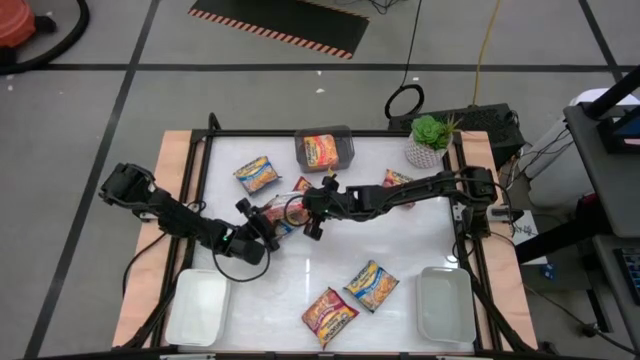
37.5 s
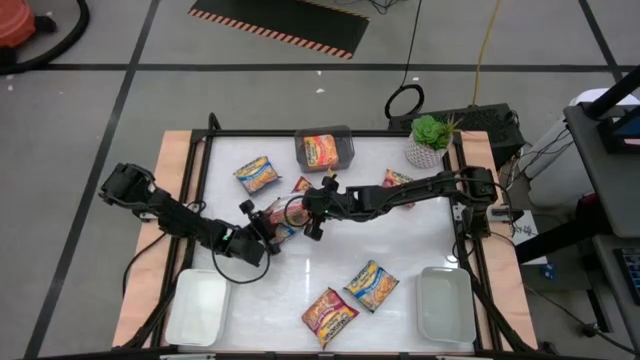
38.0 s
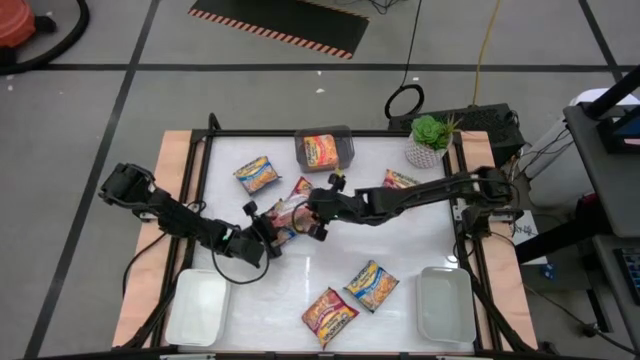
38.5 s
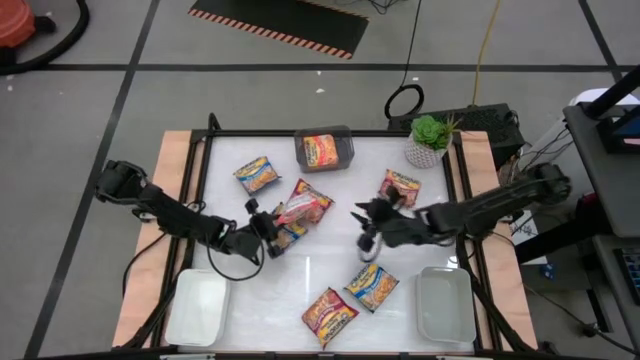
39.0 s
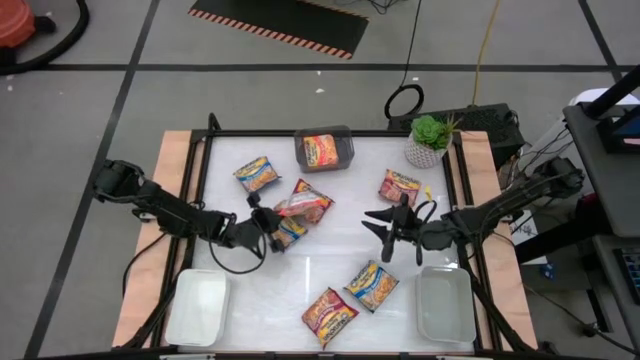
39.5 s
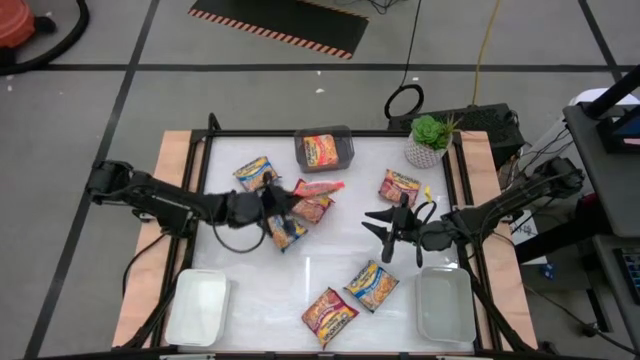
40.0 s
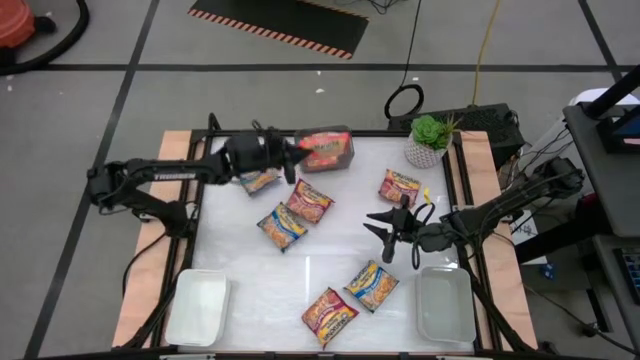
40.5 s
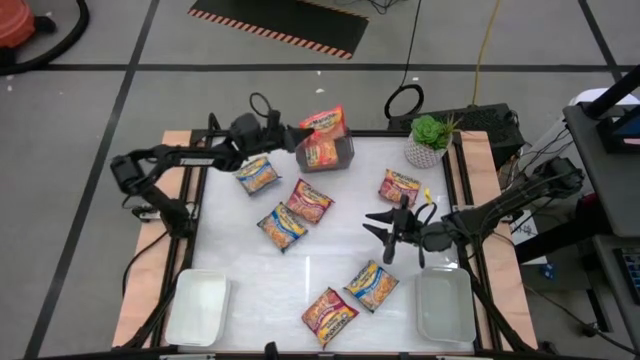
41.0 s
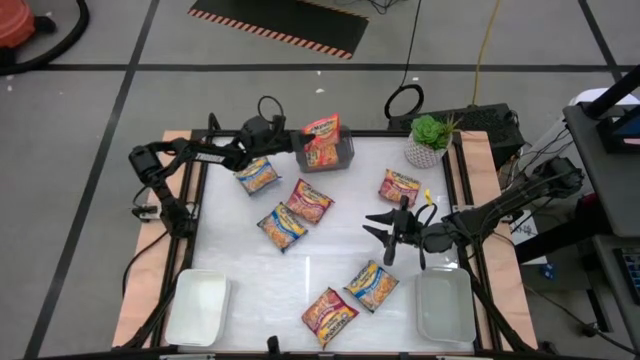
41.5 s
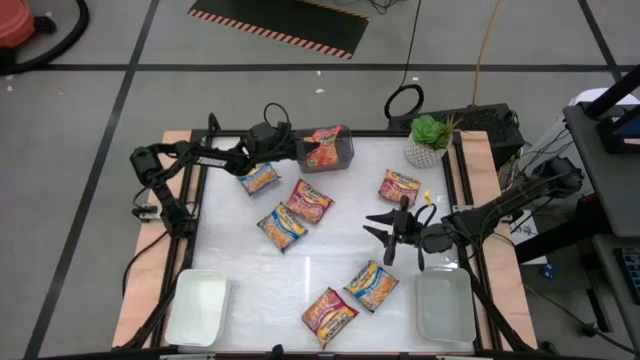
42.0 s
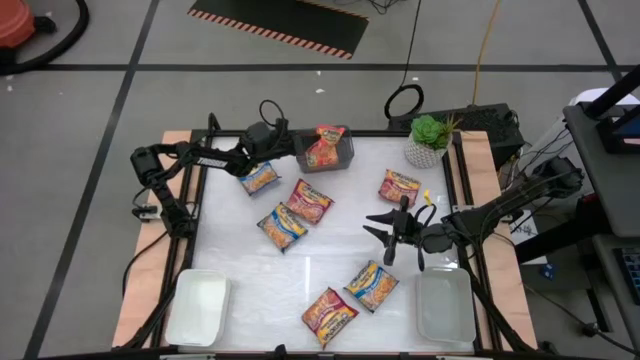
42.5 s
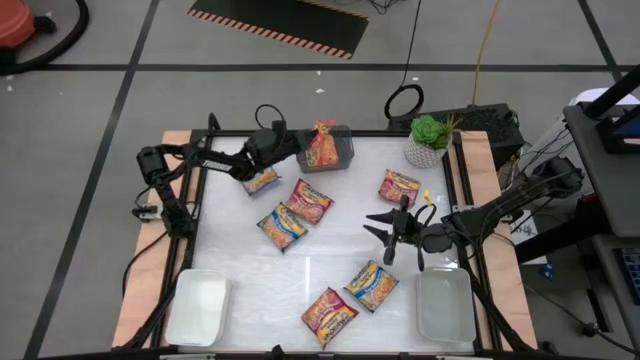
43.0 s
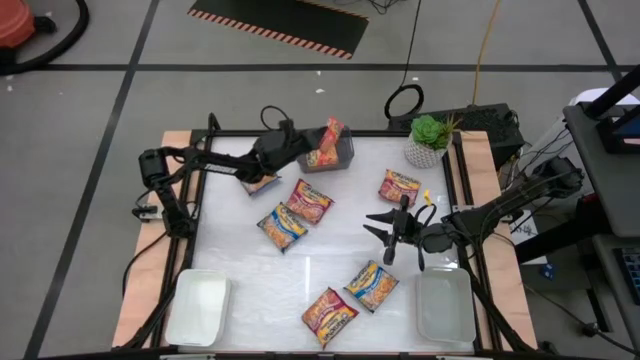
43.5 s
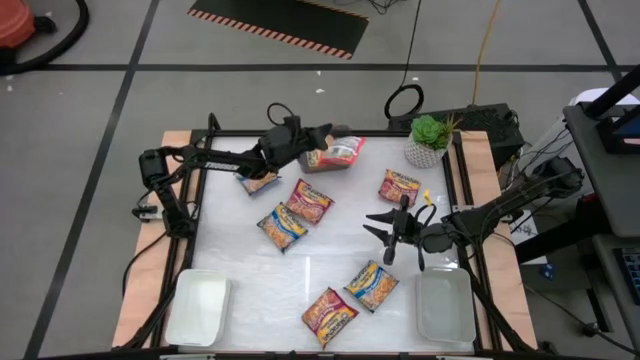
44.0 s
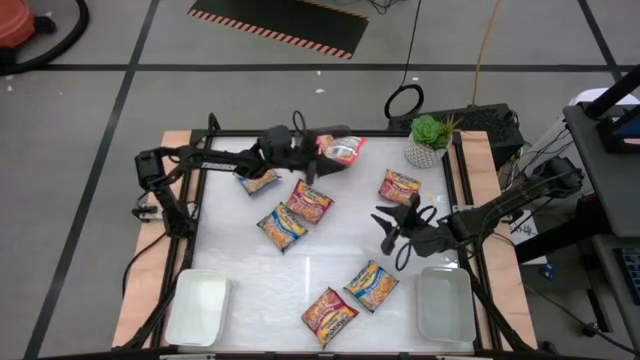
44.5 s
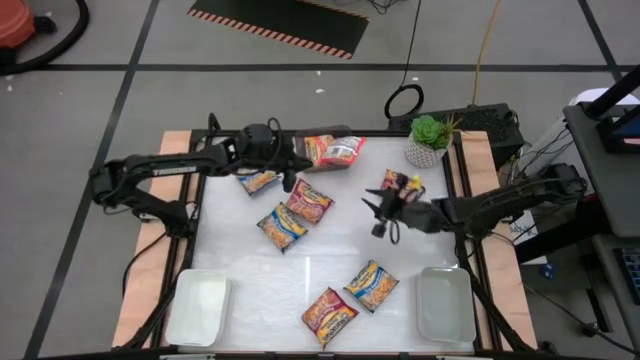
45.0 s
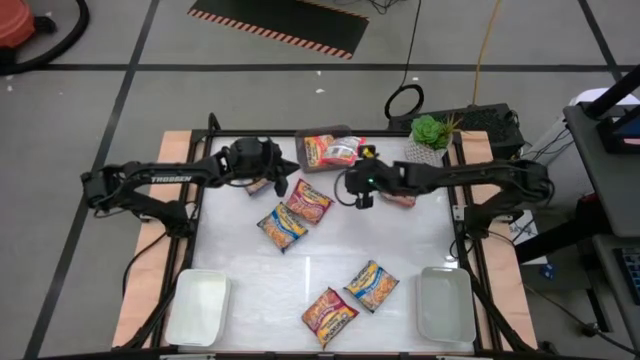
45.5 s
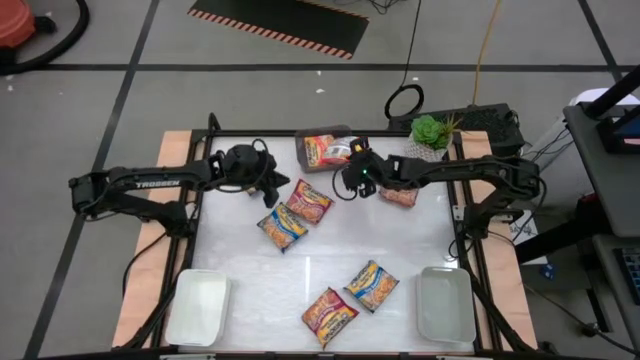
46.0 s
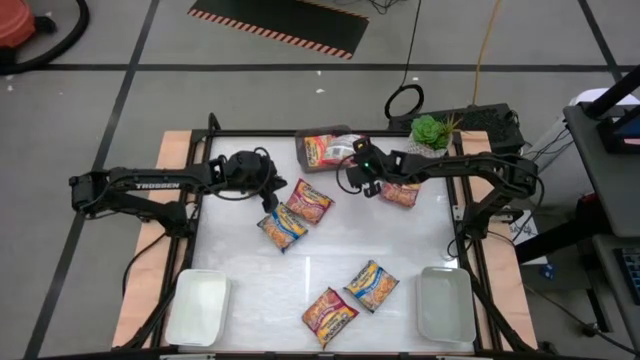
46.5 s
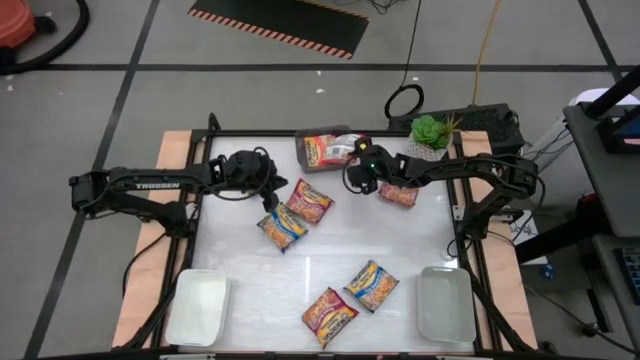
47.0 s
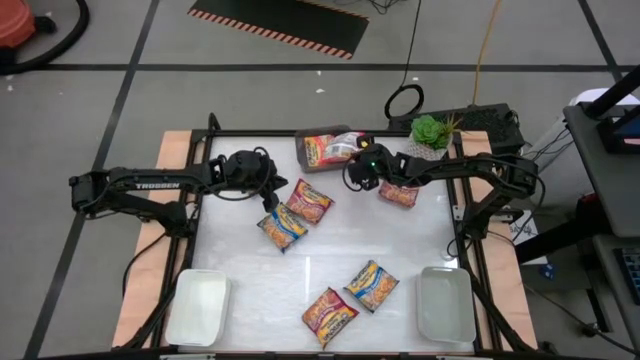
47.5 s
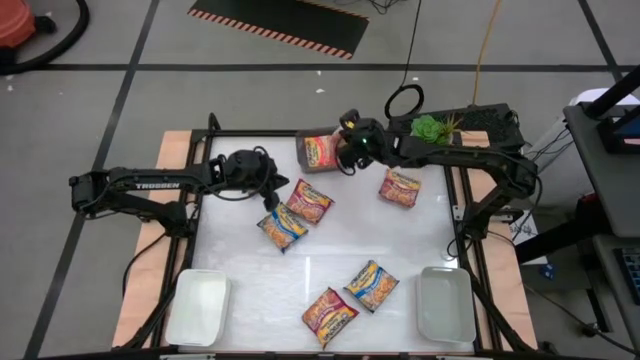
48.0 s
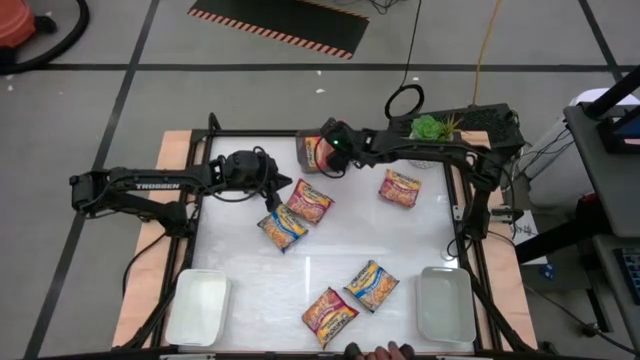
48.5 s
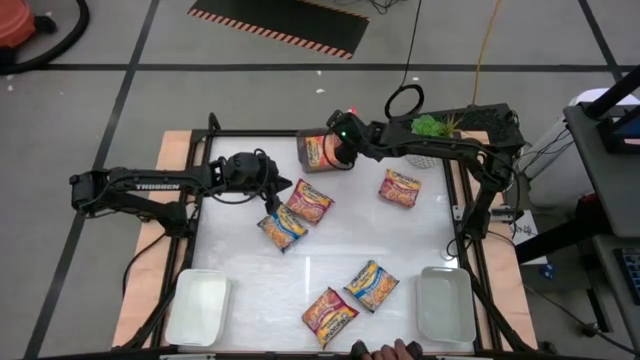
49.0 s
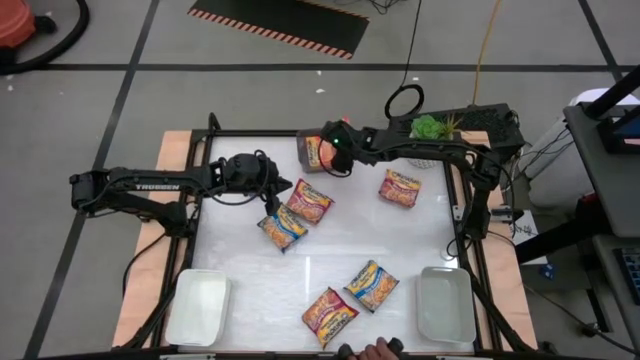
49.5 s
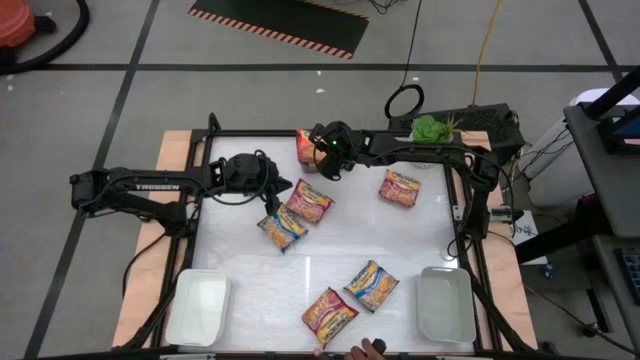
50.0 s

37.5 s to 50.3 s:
Task: Sort Maruchan noodles
Put the orange noodle pack into the black bin

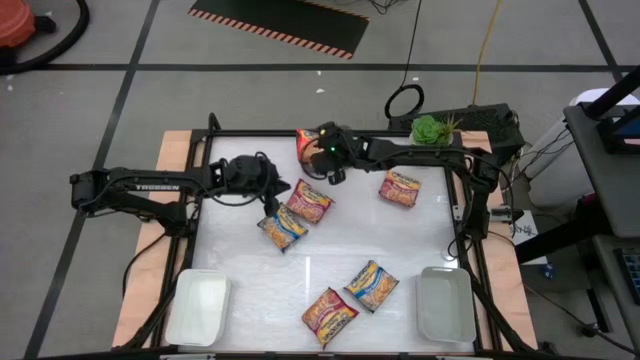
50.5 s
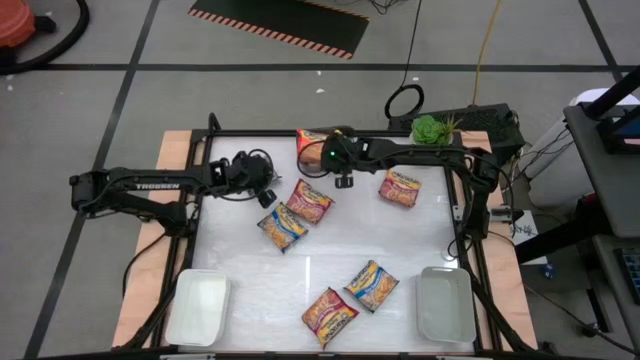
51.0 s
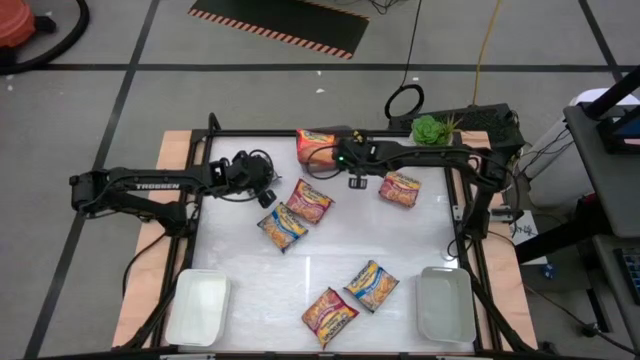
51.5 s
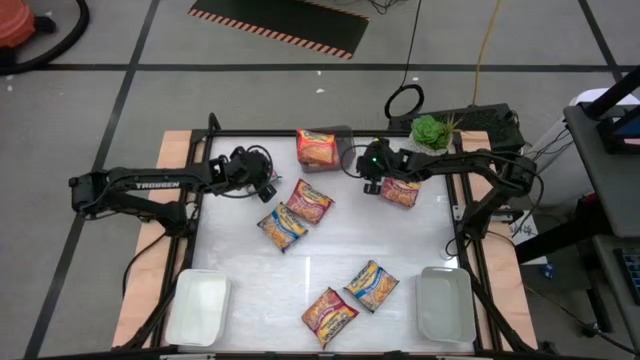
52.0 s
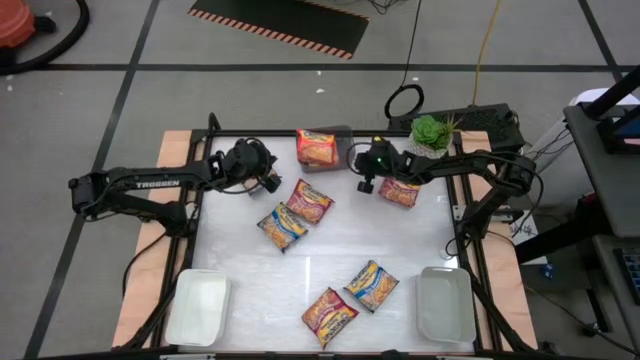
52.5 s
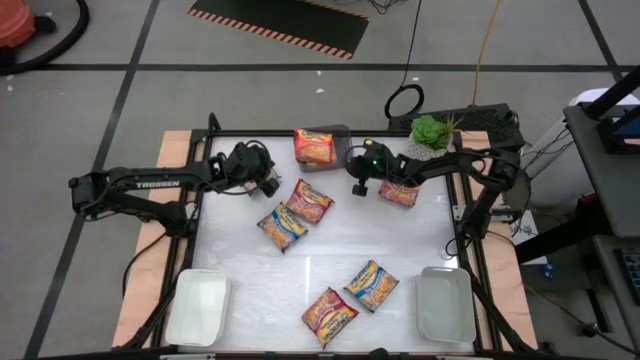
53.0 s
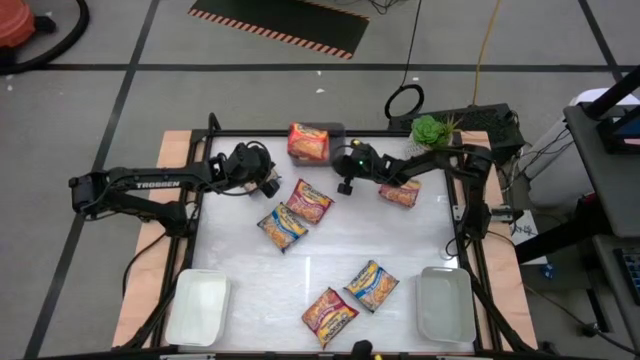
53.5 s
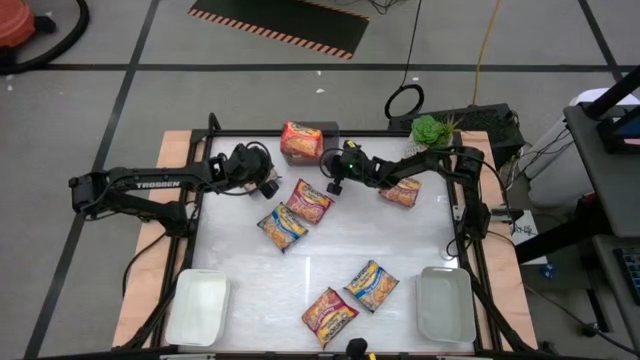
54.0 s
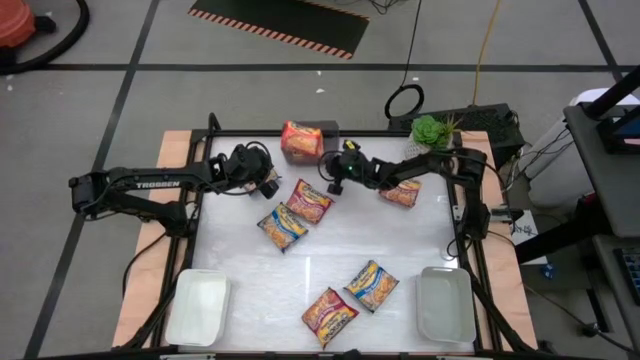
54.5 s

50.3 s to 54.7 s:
Adjust the black bin

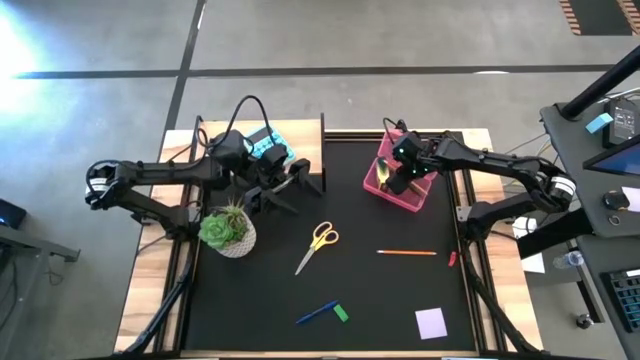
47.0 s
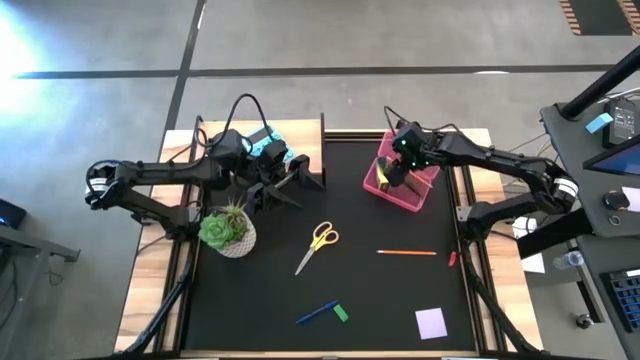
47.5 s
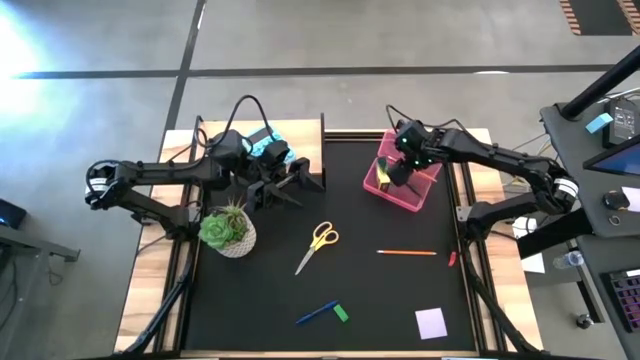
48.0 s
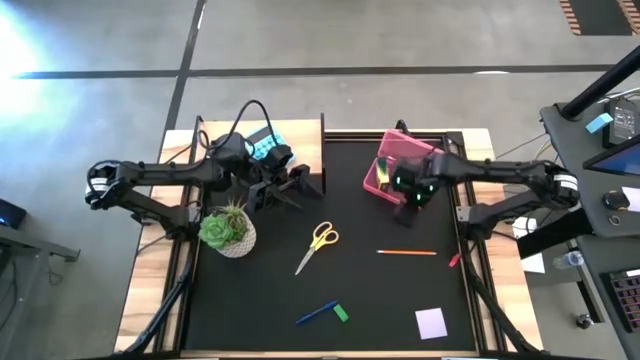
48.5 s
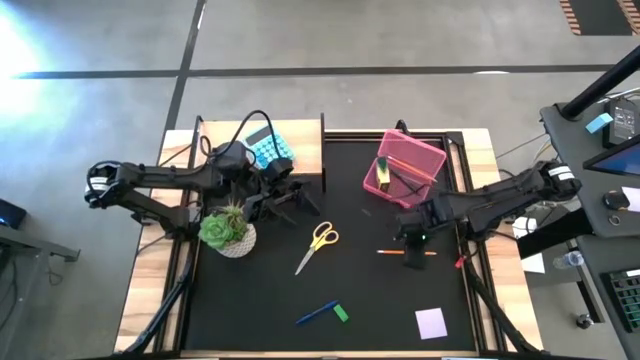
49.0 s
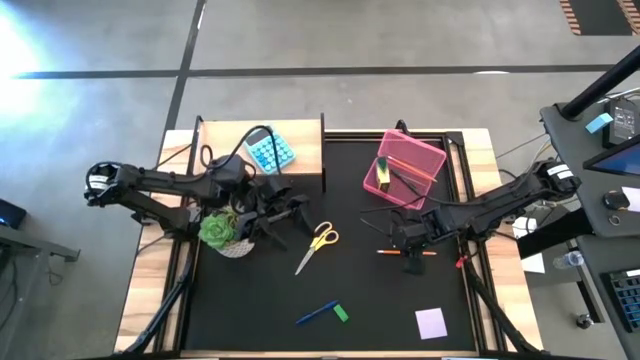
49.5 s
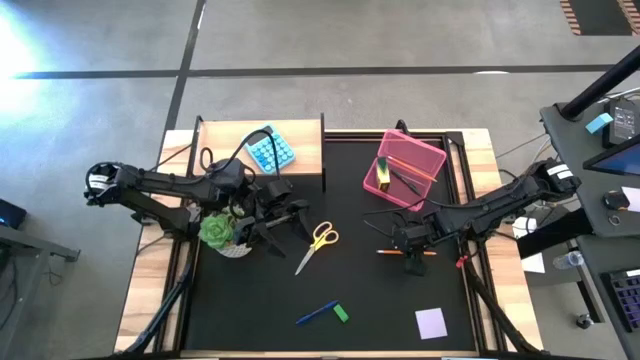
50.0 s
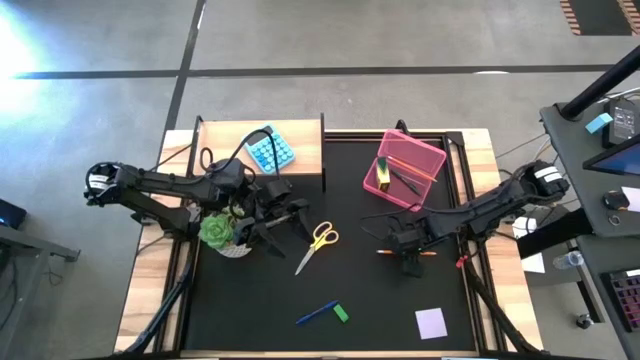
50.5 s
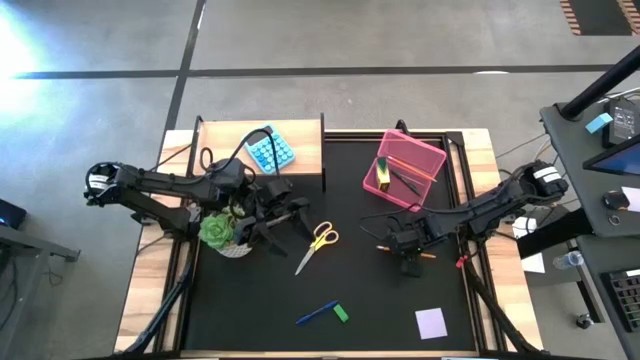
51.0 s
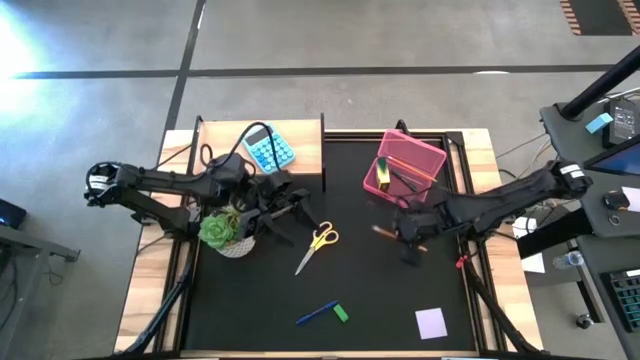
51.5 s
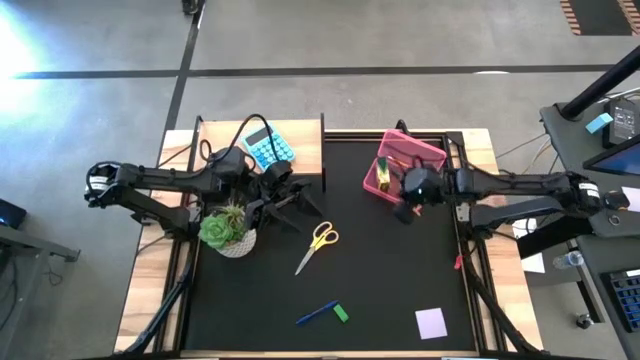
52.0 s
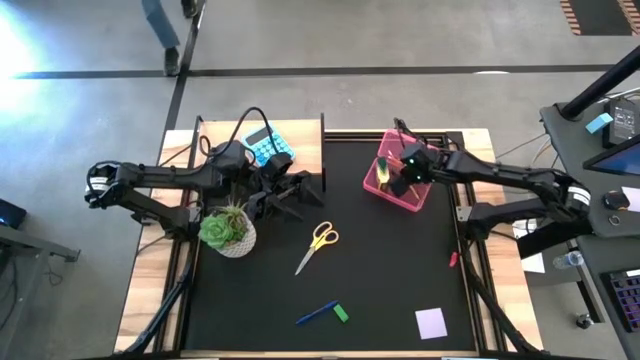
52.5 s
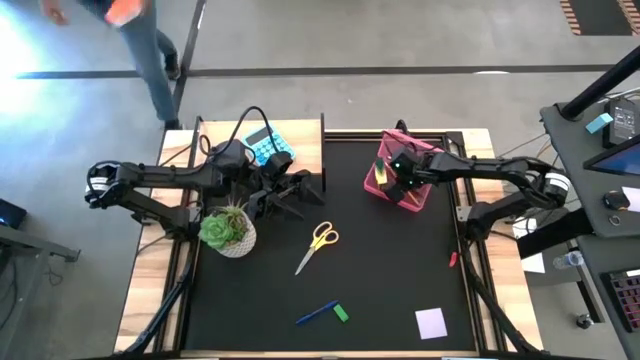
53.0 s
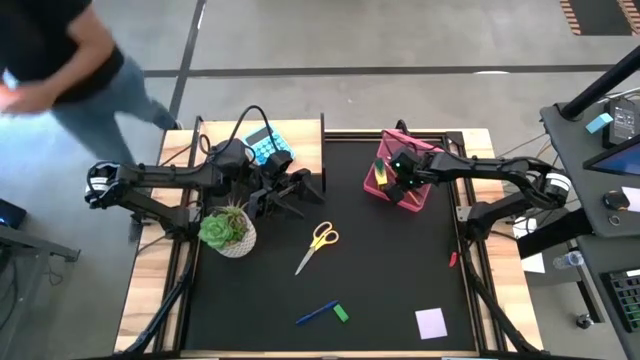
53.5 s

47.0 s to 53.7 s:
Task: Pack school essentials
Put the yellow pencil into the pink supply box
